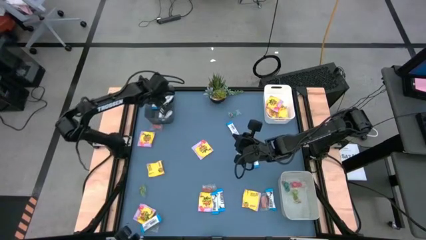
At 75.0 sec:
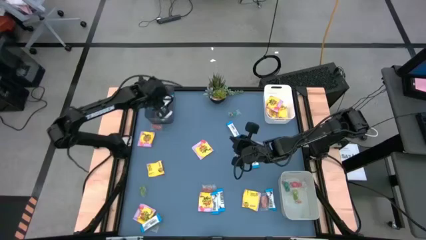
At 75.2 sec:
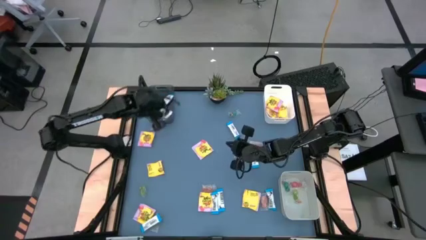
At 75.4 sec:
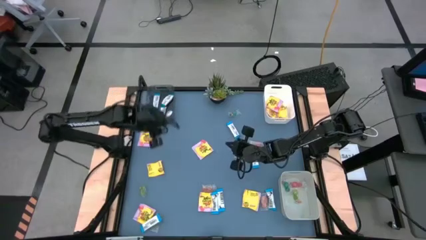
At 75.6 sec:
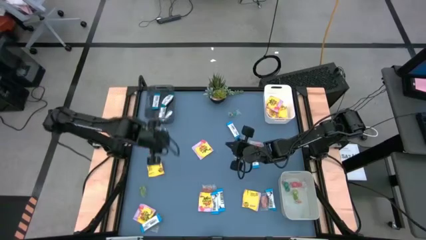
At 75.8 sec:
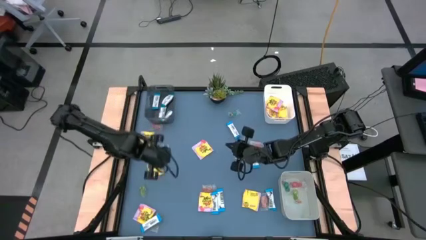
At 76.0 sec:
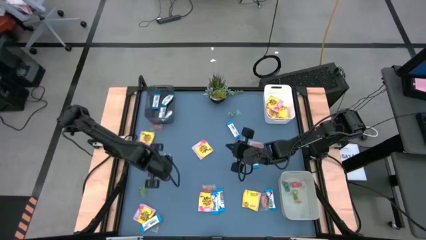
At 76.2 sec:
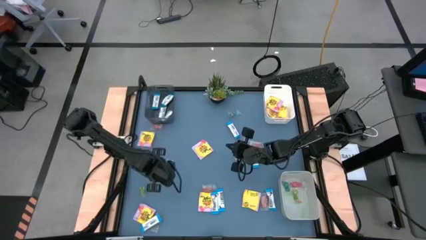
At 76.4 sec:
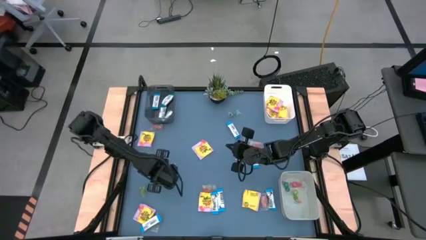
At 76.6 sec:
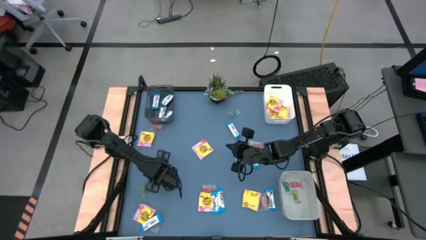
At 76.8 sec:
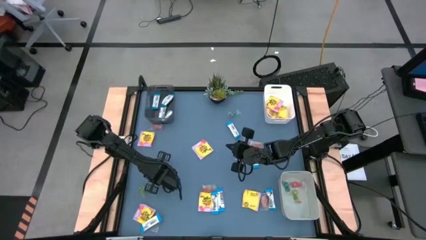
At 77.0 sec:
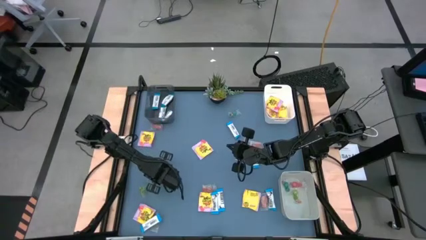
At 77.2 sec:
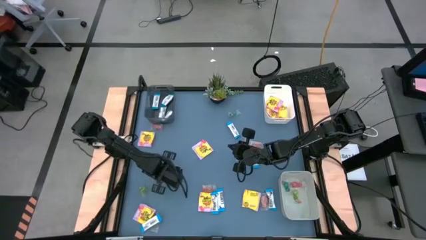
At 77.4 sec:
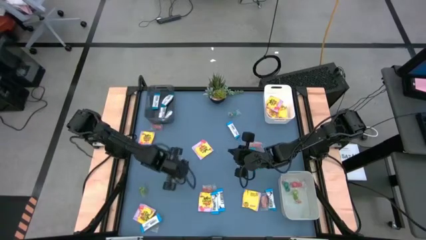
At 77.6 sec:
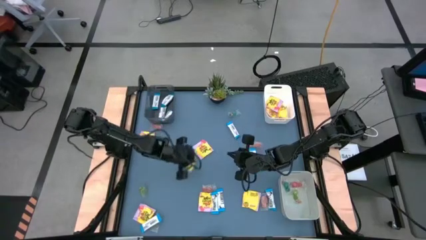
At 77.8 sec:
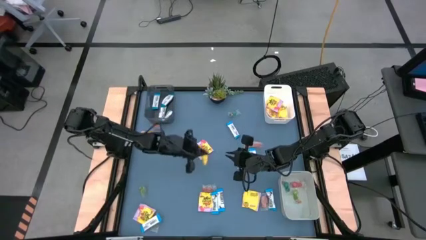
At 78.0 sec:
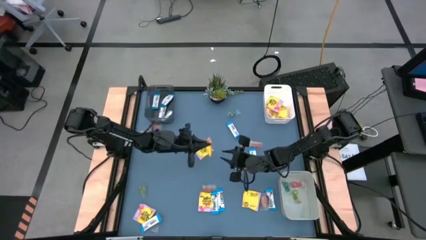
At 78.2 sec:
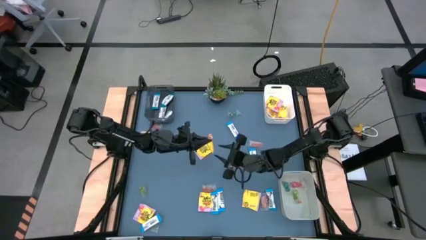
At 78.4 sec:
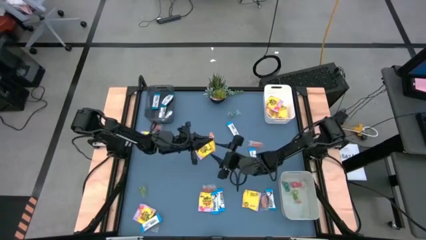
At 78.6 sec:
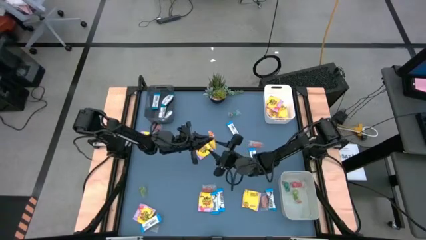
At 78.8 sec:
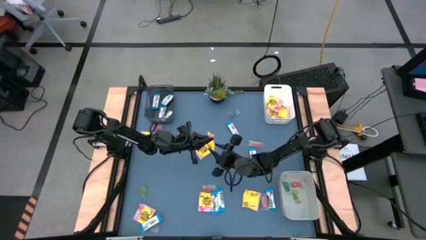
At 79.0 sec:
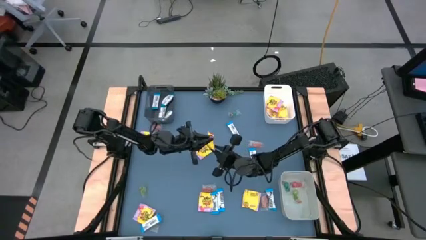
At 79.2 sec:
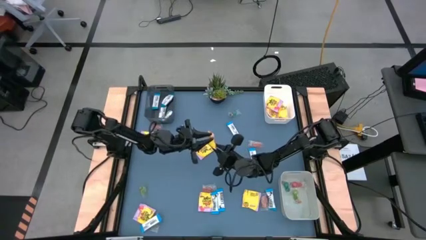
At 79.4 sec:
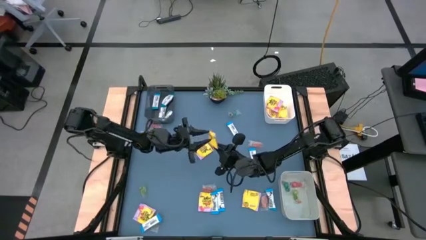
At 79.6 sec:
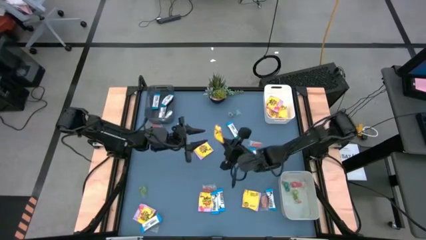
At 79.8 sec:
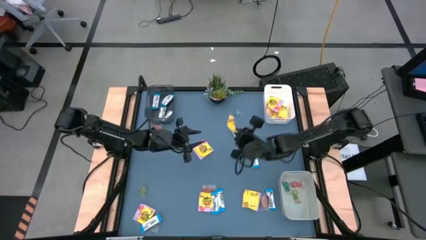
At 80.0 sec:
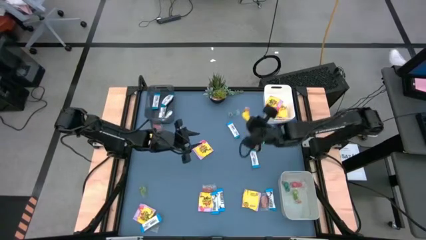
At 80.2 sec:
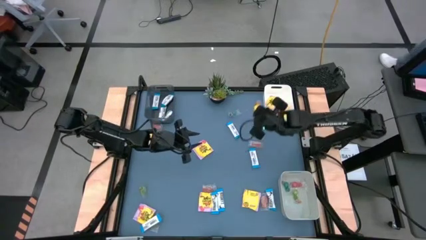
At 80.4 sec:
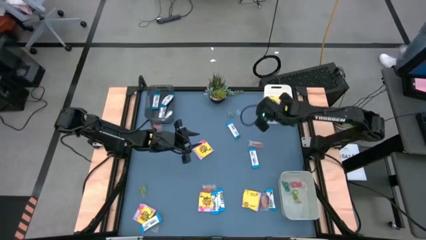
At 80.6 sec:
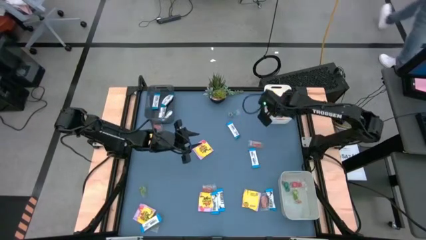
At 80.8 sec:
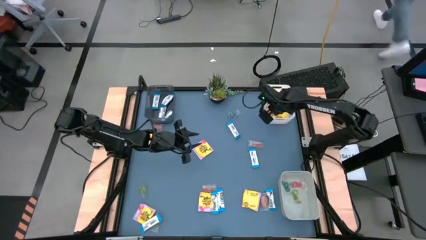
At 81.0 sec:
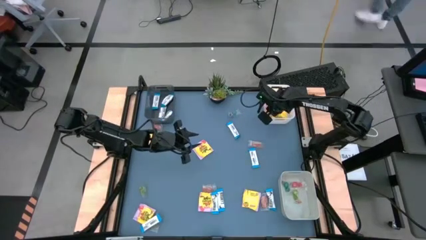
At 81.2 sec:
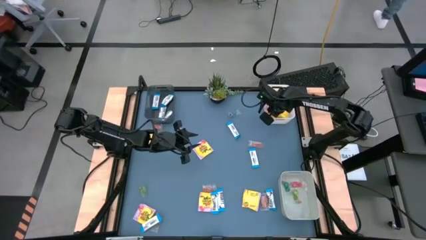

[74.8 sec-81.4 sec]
Task: Sort candy
Put the middle left yellow candy pack into the white bin

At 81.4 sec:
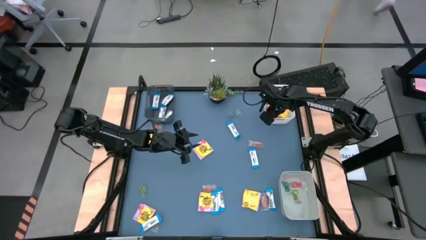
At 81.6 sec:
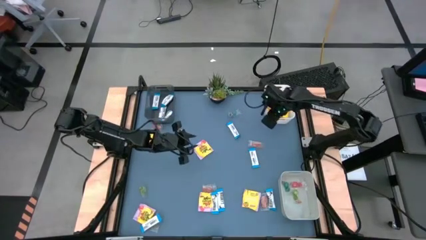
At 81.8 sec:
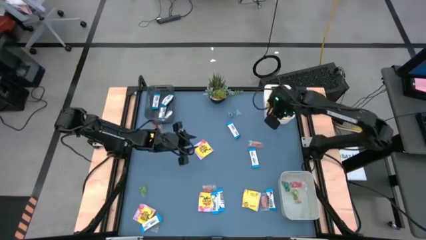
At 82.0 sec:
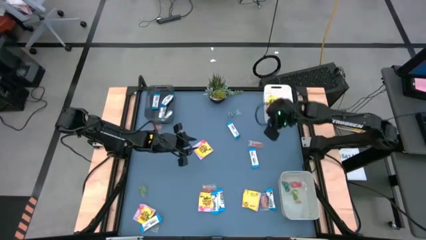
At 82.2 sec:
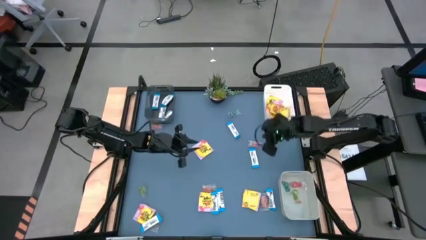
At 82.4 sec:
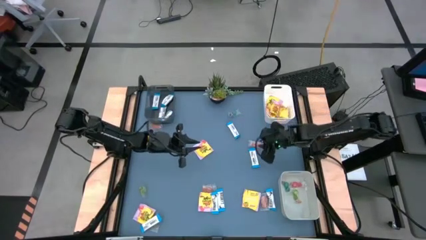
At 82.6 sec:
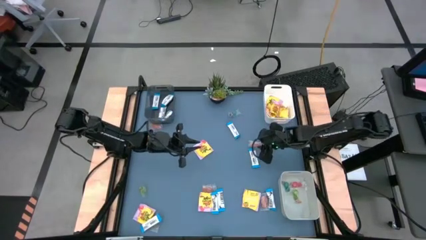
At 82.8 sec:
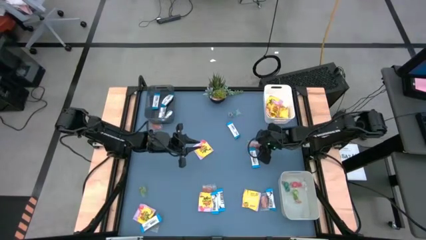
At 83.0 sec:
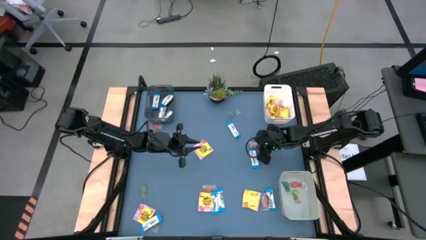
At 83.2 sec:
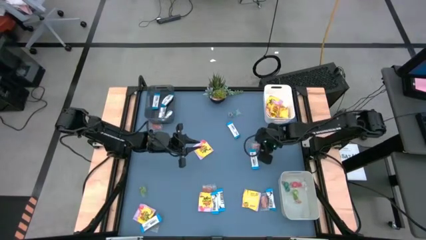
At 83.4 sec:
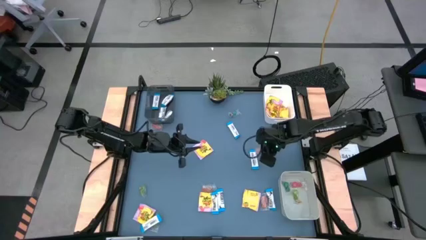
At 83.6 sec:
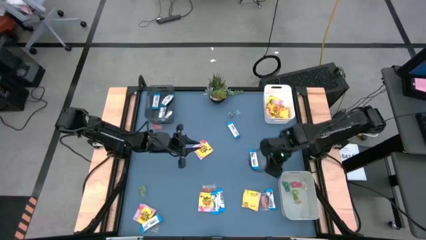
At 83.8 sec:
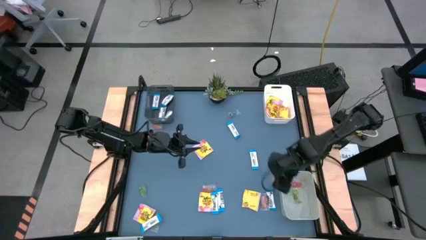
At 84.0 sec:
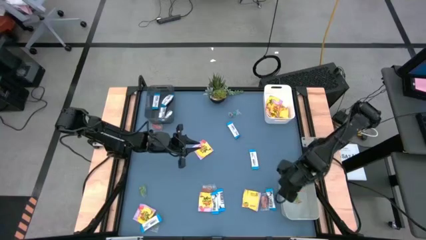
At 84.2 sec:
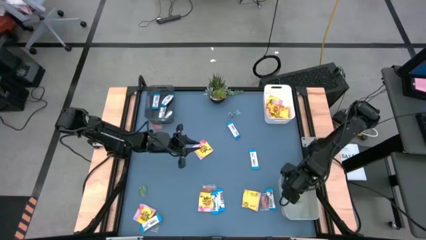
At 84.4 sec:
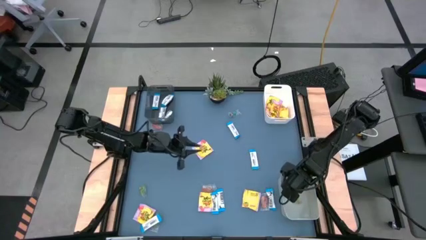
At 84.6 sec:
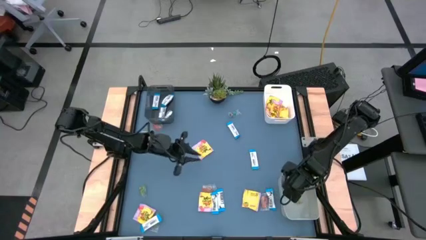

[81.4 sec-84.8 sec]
Put the top right orange gummy candy into the grey bin

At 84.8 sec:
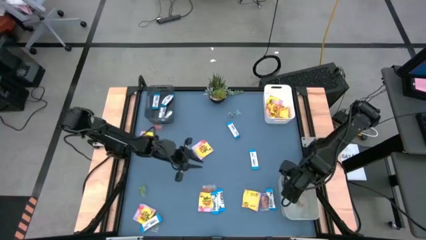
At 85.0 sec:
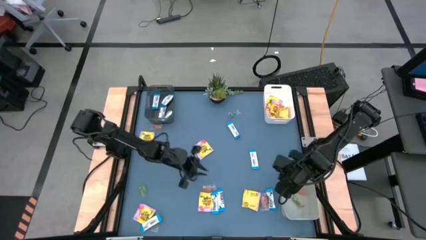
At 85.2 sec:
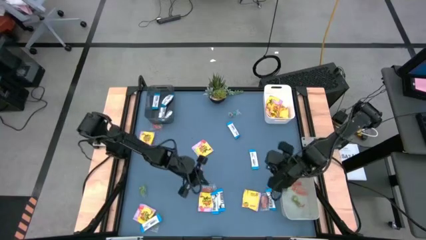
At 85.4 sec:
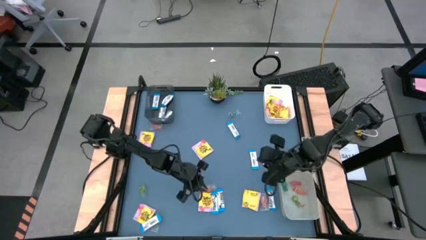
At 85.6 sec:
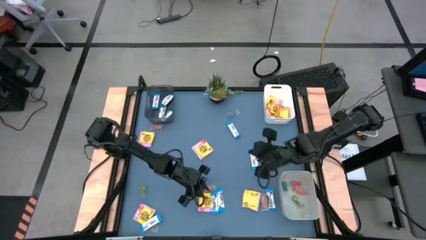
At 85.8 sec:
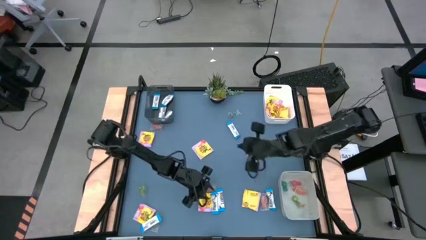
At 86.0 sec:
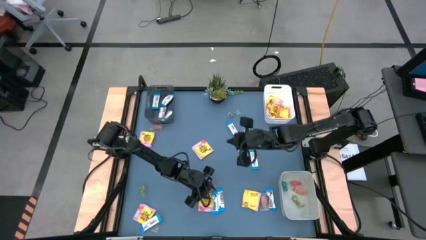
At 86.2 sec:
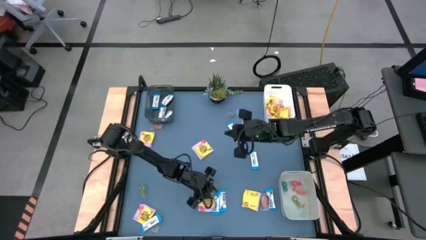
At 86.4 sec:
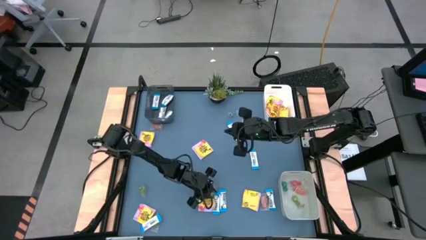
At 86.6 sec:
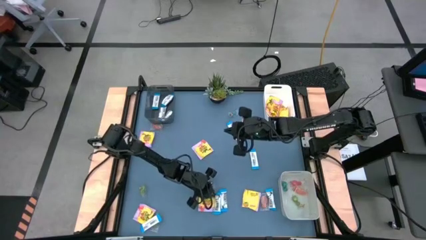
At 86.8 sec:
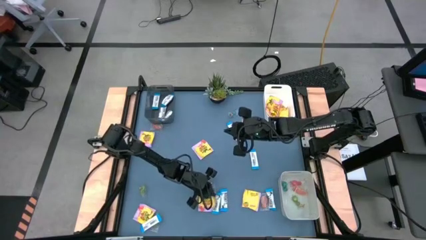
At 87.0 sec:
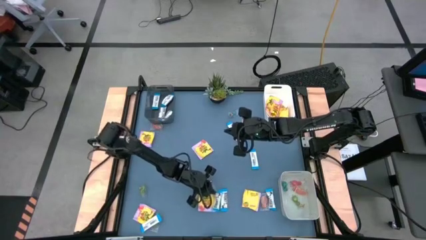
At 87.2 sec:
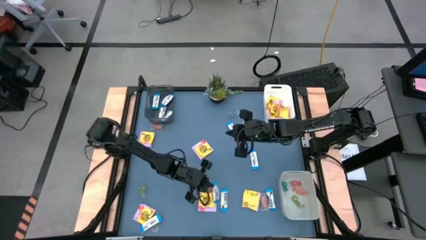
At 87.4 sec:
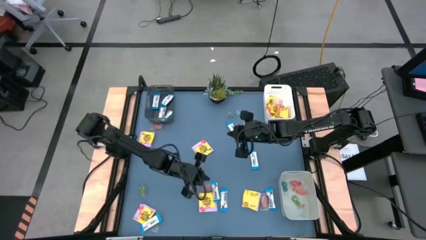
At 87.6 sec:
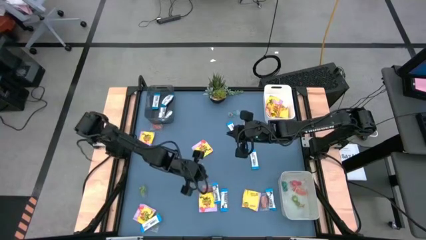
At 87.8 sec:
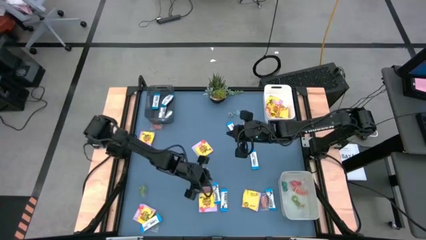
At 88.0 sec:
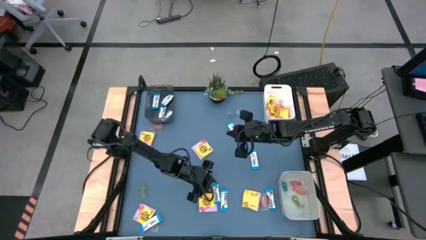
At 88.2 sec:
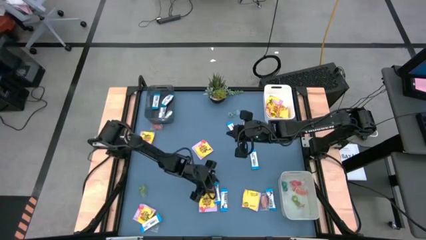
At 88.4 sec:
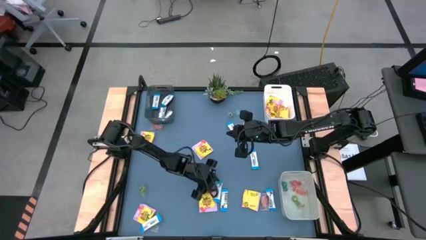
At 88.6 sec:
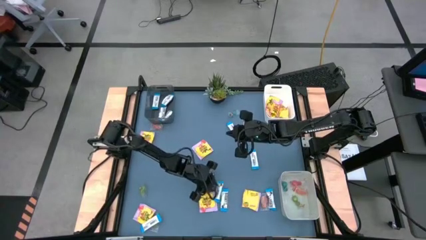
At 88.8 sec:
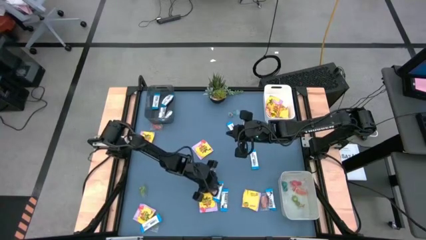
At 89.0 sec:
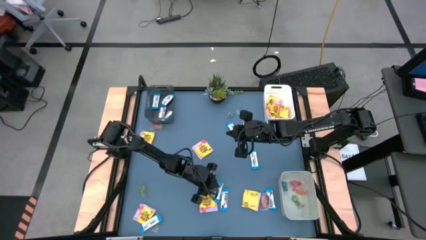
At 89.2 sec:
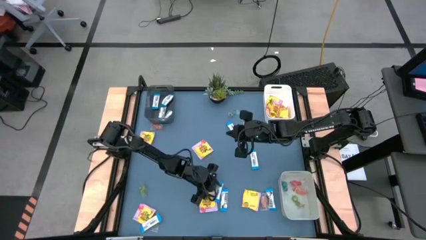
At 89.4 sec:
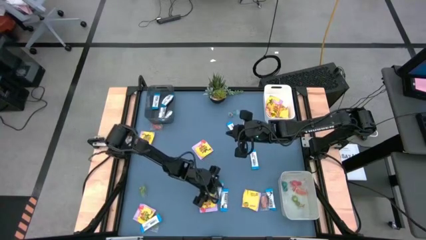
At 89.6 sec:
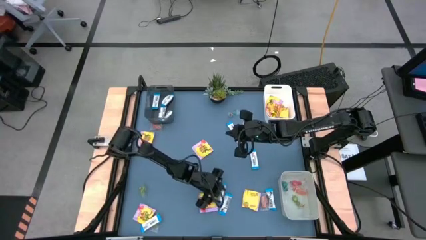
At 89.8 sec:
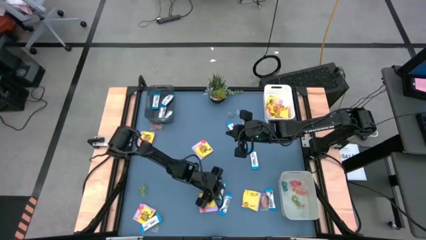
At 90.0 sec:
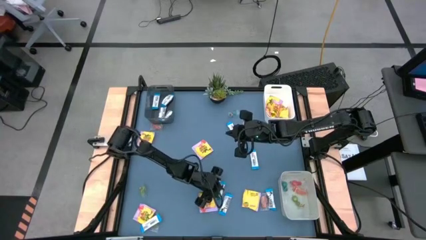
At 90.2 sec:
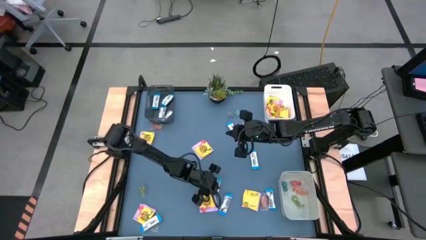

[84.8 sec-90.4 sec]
Put the middle bottom white chocolate bar into the transparent black bin

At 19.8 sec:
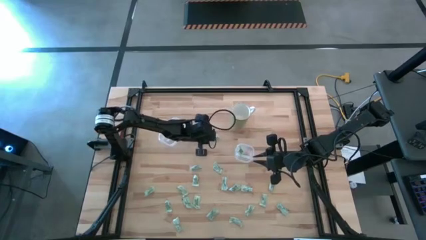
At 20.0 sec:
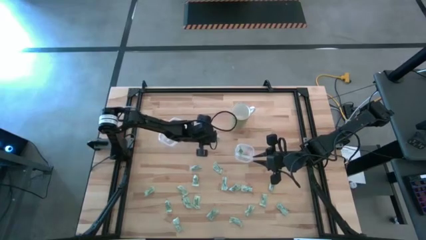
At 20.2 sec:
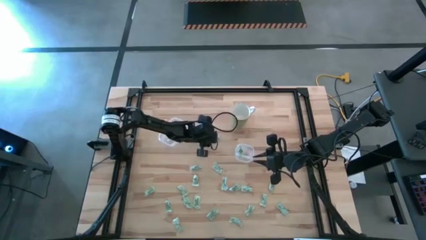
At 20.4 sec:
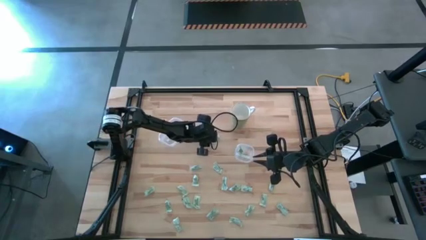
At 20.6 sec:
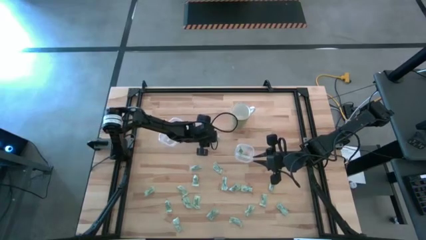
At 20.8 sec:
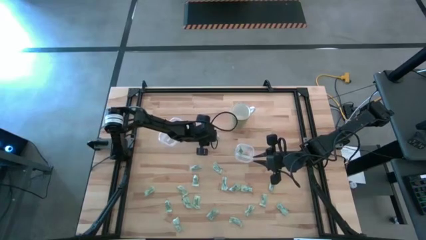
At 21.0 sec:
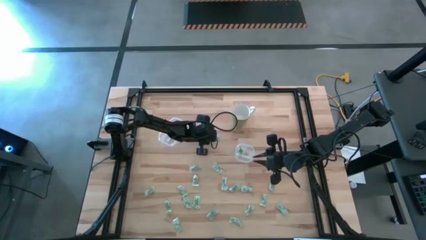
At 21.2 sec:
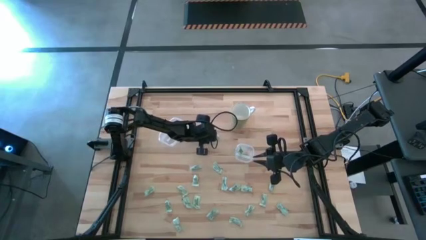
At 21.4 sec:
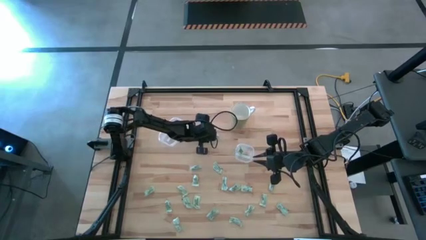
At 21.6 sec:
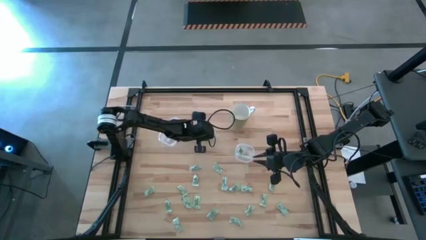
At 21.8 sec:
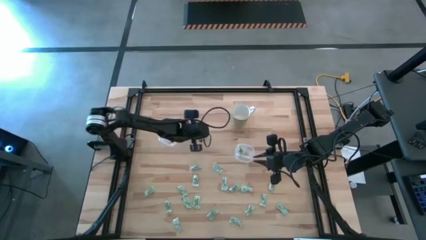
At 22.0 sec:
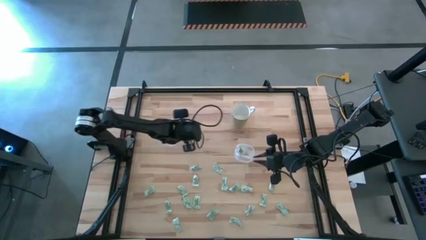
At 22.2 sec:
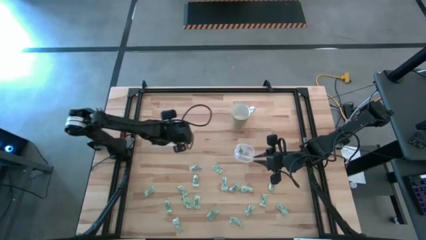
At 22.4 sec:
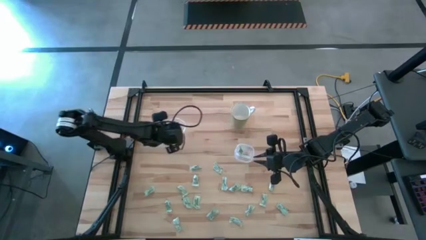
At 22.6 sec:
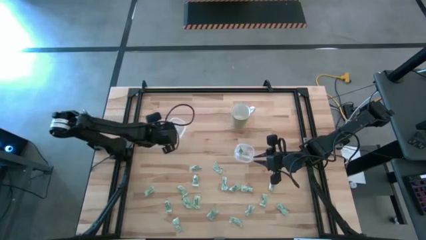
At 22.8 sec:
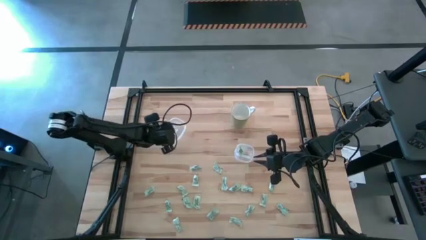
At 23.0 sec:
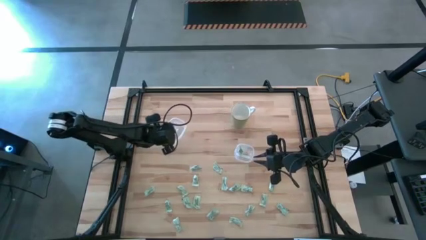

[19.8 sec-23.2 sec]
Task: Pick and place Stevia / Truvia into bins
Put the stevia packet into the left transparent container
